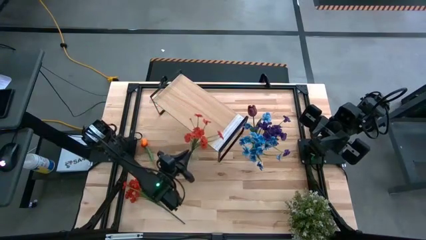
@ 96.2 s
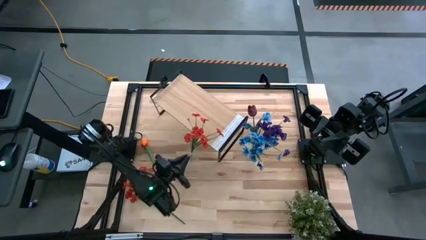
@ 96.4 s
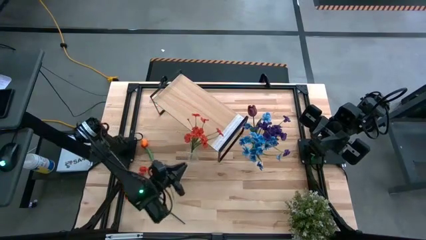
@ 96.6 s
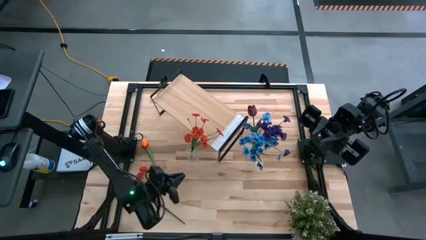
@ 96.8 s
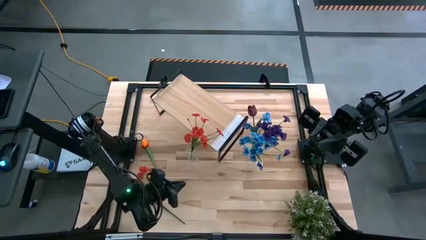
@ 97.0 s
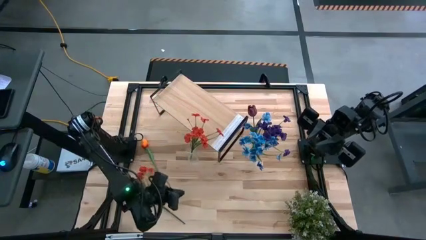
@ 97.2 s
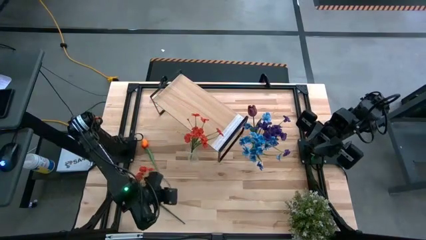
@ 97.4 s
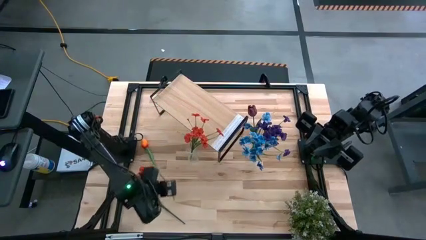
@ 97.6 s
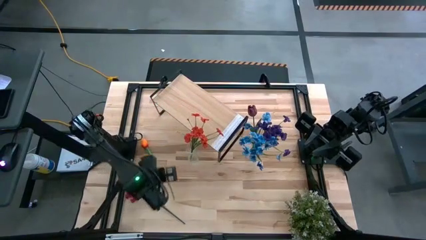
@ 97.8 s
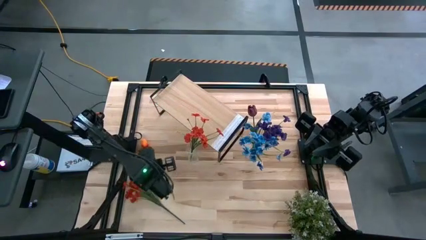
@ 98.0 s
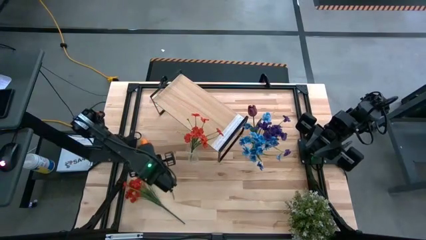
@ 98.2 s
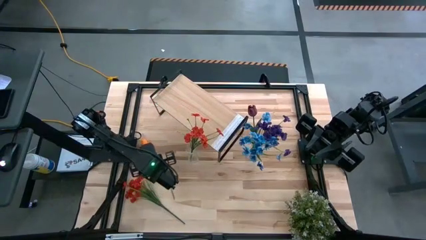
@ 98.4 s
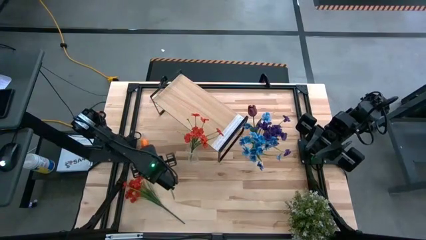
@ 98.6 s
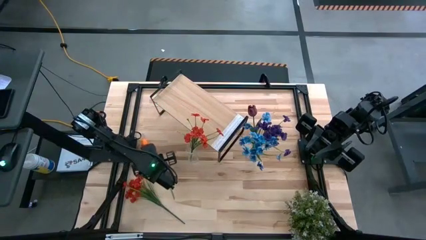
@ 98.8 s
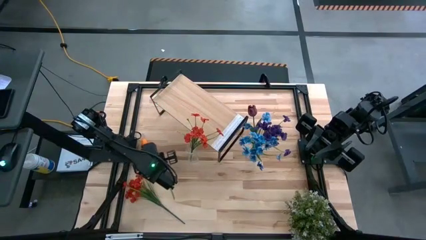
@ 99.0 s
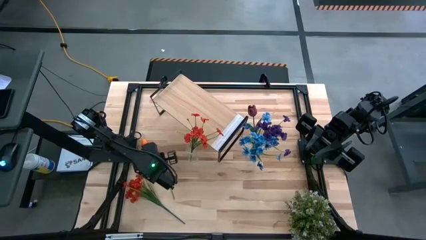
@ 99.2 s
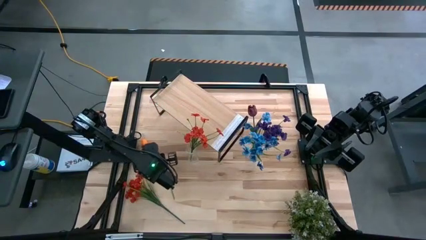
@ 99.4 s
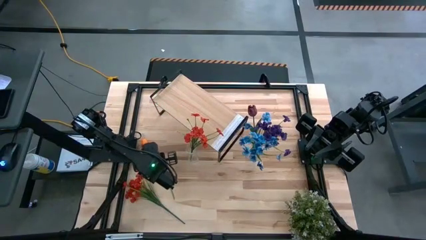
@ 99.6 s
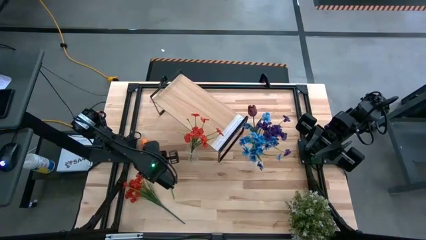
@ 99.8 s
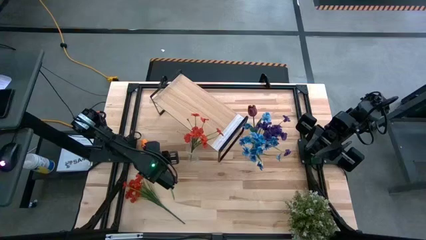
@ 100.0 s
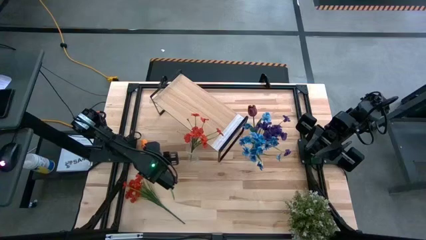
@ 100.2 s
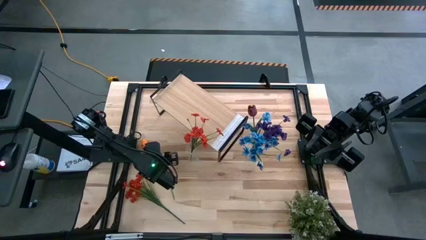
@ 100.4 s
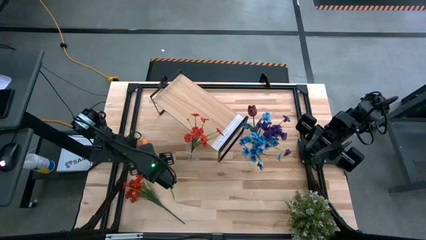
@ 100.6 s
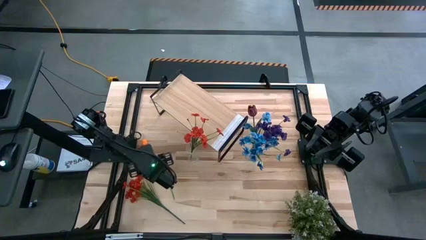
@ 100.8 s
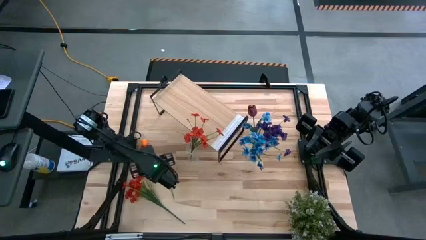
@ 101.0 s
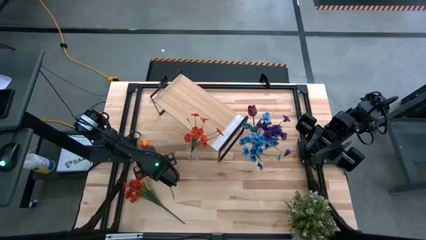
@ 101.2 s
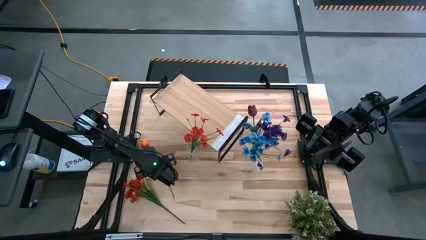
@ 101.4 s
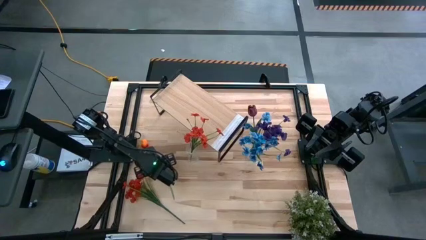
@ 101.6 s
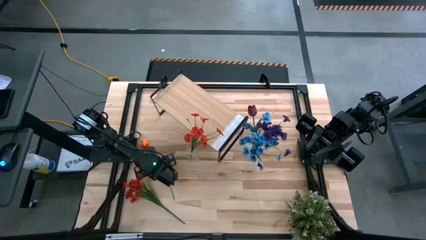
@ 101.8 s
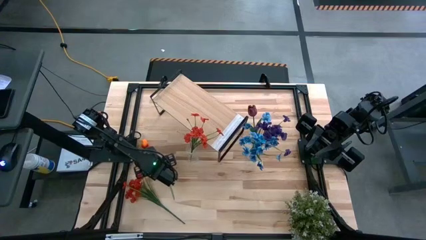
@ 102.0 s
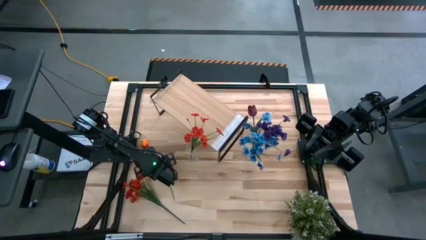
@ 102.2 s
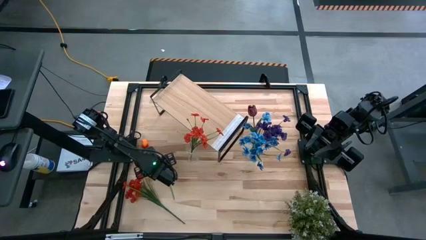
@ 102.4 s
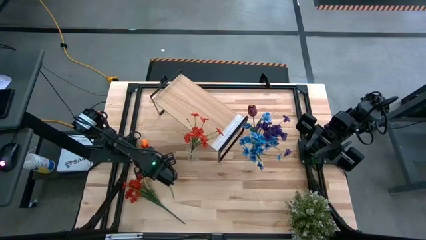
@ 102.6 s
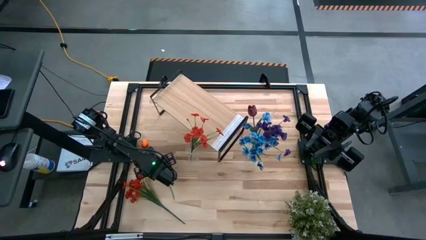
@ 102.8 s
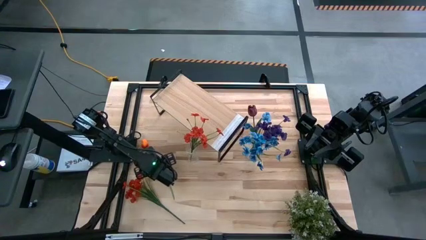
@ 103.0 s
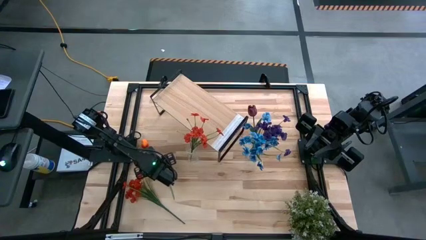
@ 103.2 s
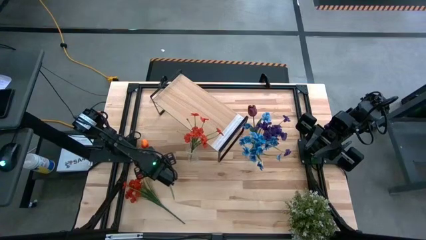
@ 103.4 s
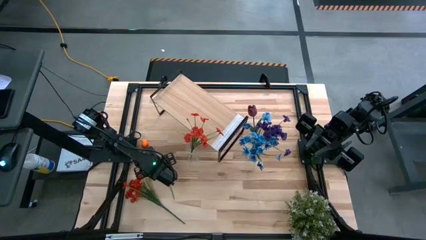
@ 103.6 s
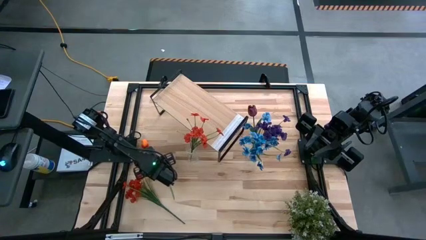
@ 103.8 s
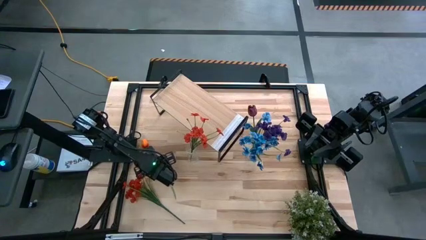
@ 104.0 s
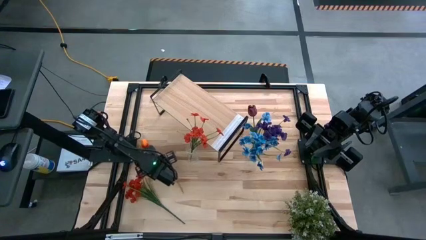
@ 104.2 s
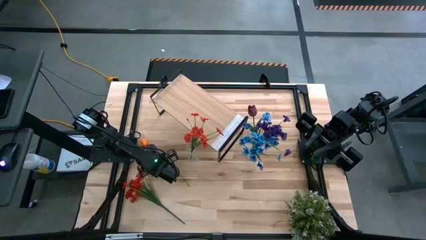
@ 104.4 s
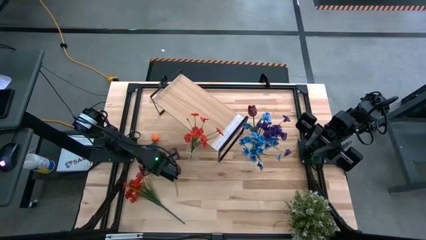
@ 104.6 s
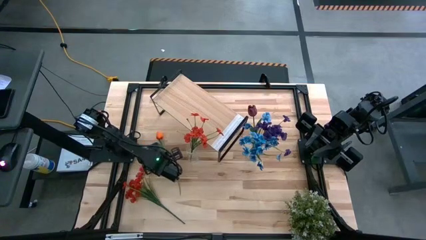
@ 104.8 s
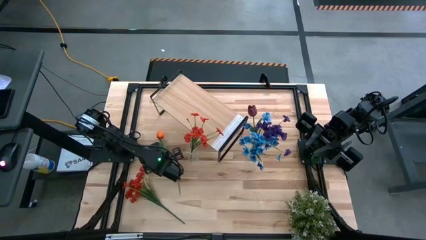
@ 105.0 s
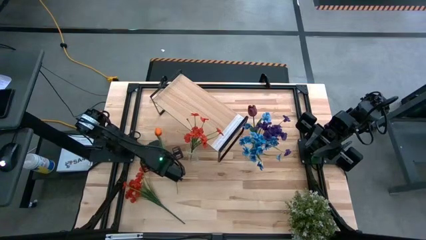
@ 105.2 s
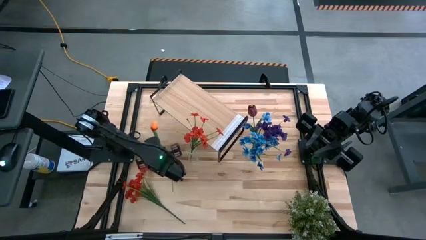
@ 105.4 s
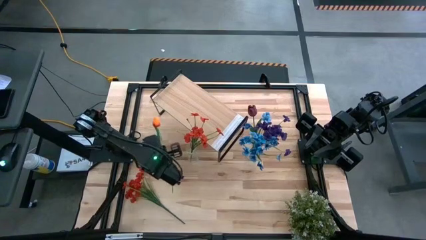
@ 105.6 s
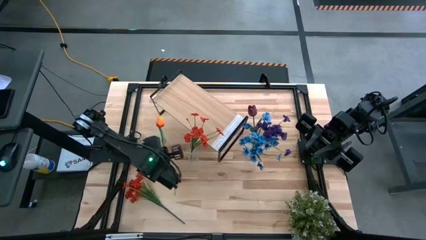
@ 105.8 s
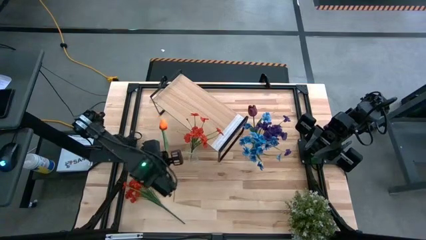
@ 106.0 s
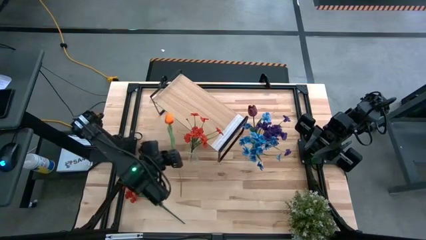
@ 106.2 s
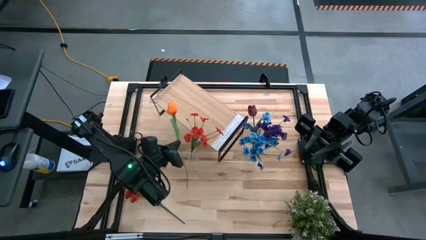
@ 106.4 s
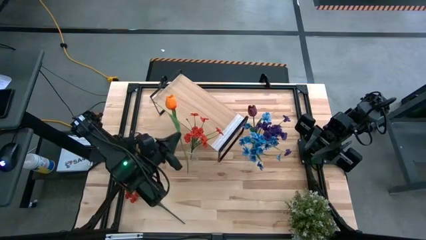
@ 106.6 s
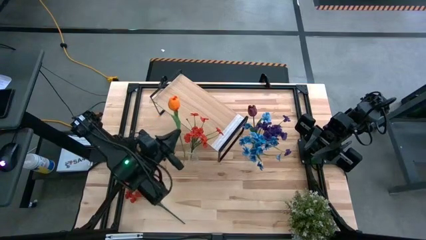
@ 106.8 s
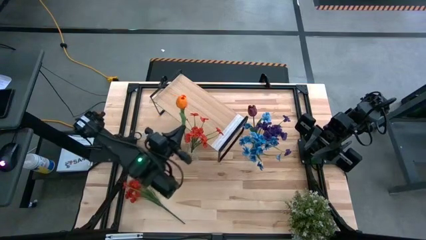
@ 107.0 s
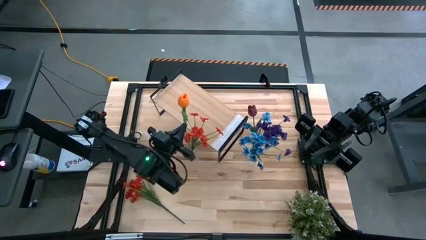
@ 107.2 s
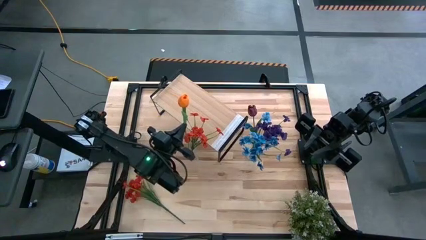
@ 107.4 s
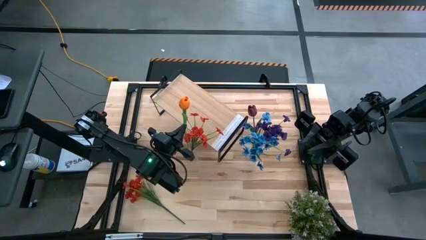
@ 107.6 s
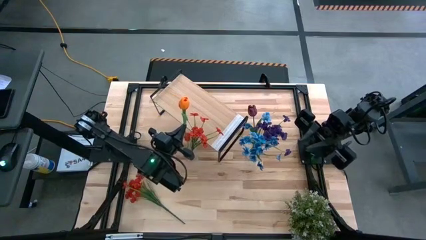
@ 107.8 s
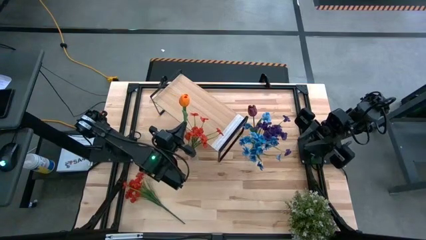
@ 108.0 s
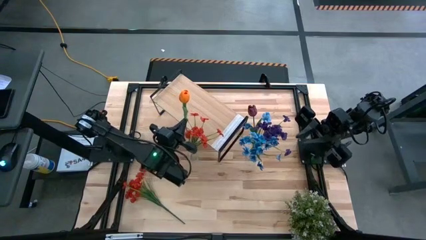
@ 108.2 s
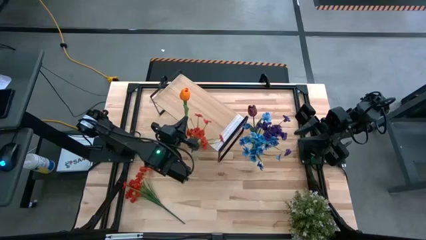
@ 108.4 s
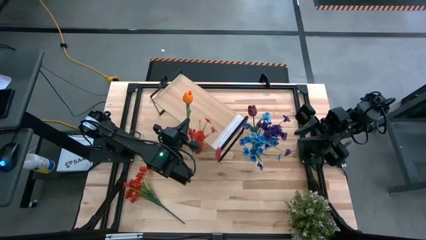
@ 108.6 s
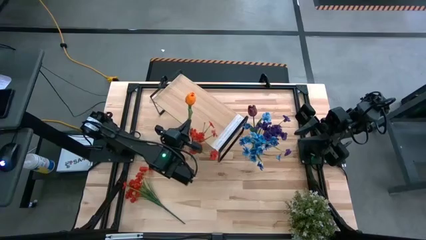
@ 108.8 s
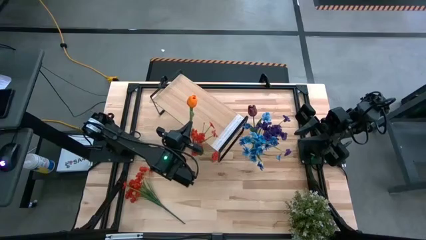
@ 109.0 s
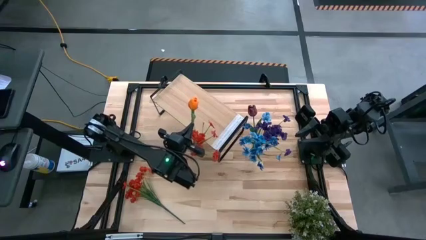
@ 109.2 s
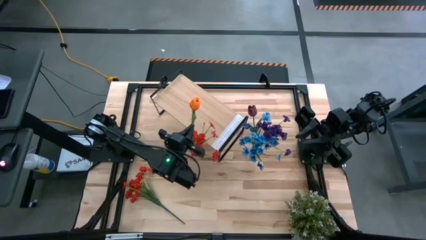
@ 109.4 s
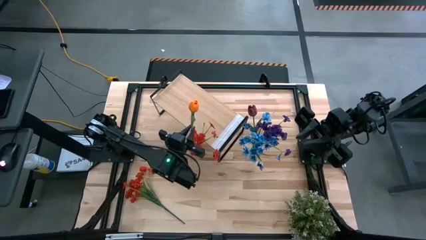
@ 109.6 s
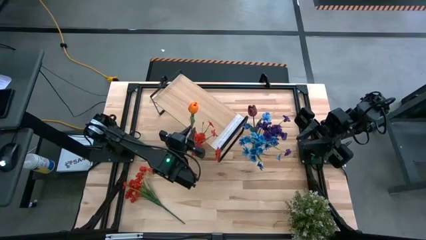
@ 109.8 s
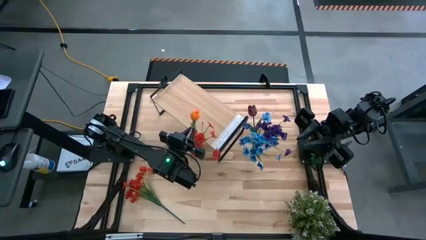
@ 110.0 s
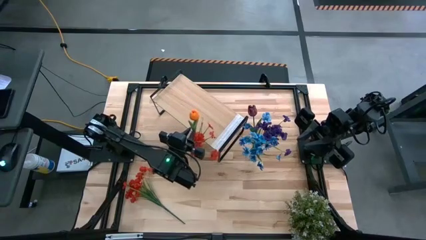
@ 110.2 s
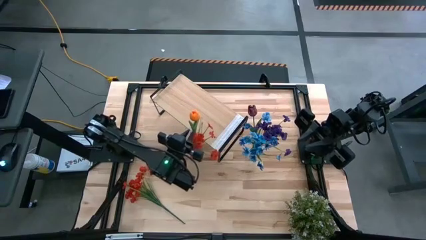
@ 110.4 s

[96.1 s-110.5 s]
Task: Pick and place flowers into a vace then onto a shelf
Put the orange tulip into the left transparent flower vase

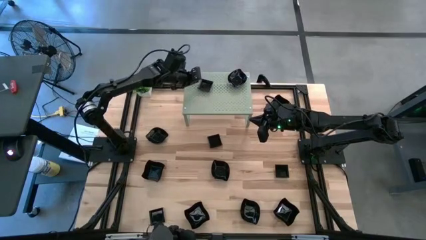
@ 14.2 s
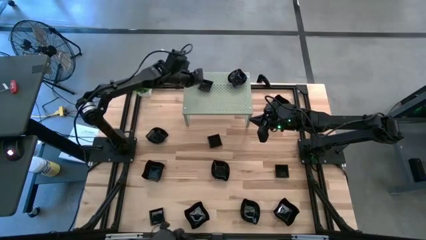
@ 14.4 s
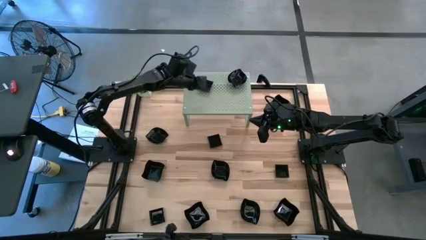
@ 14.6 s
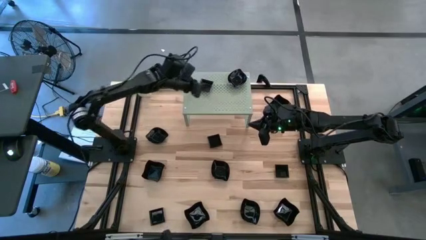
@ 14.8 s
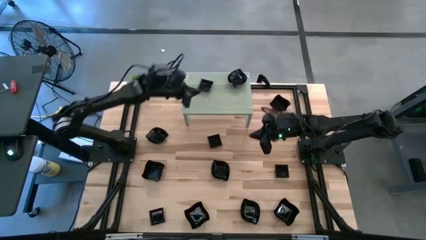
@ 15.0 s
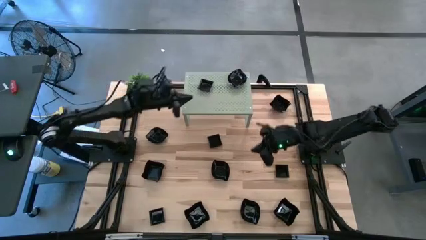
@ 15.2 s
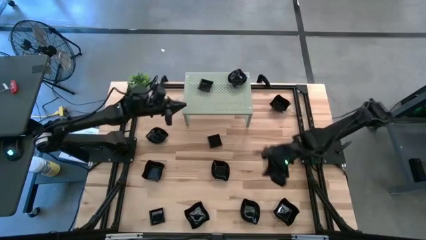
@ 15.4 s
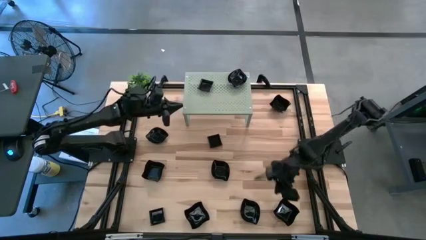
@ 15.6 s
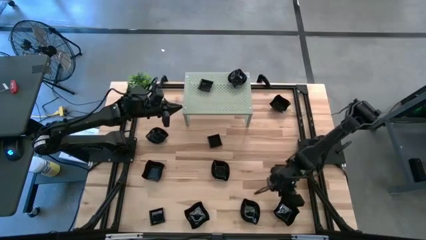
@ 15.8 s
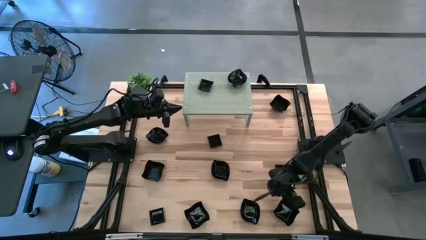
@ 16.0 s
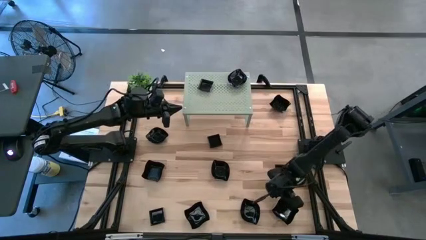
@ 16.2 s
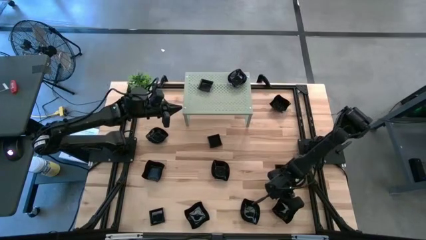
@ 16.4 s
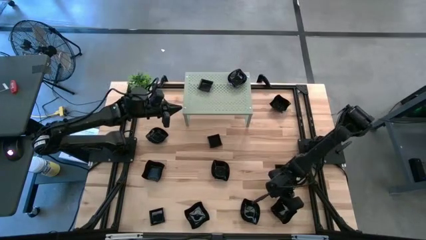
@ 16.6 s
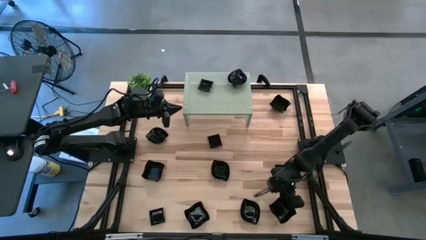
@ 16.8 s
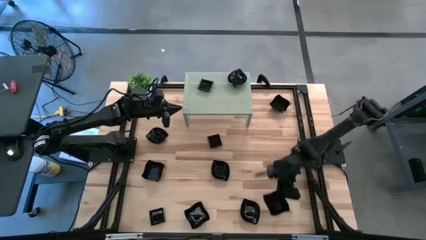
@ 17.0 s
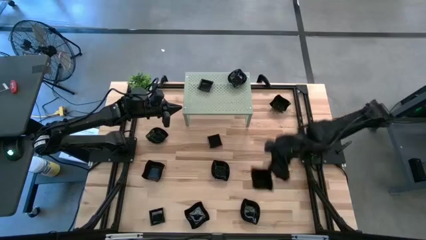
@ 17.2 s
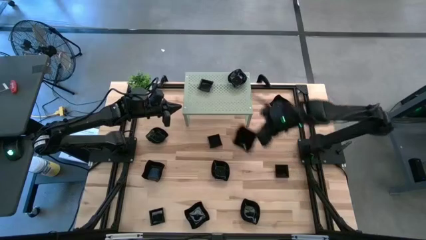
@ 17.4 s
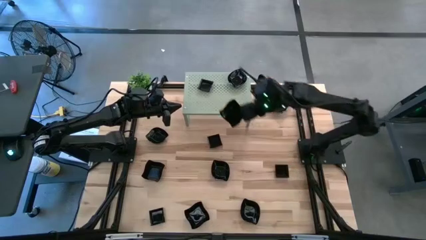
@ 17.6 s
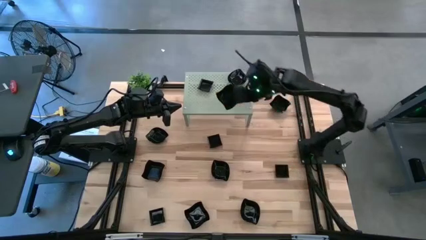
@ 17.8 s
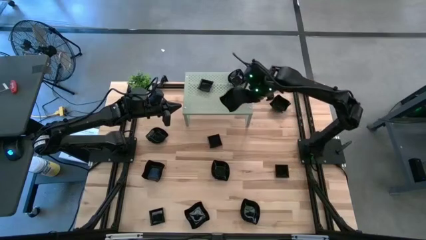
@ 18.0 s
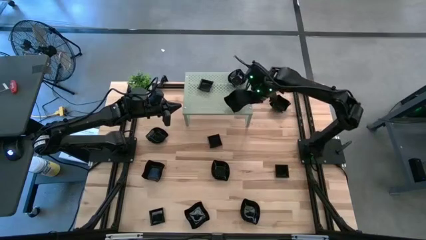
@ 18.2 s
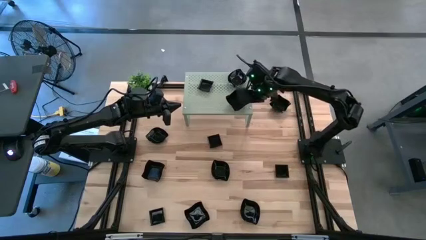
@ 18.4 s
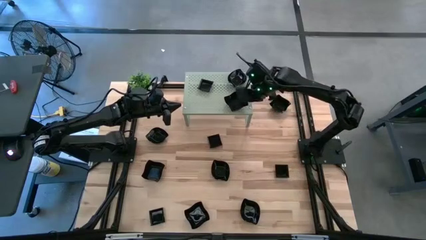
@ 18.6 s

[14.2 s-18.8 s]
Task: Pick & Place Mini shaped plates
Put the black distorted square plate on the shelf
